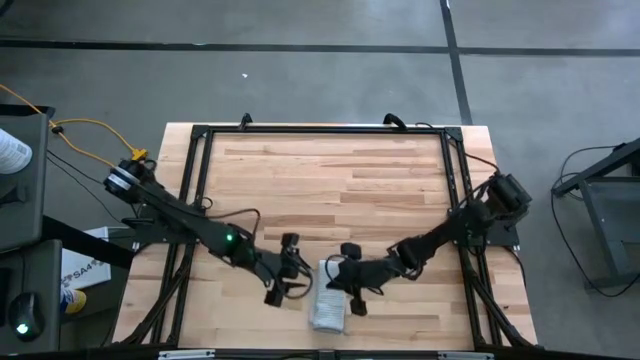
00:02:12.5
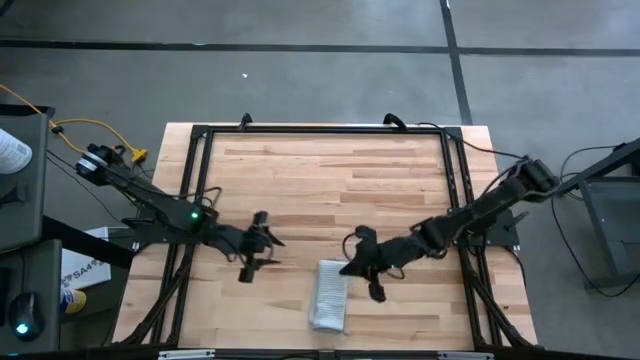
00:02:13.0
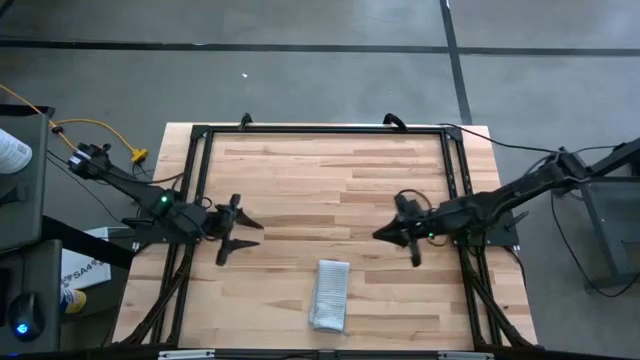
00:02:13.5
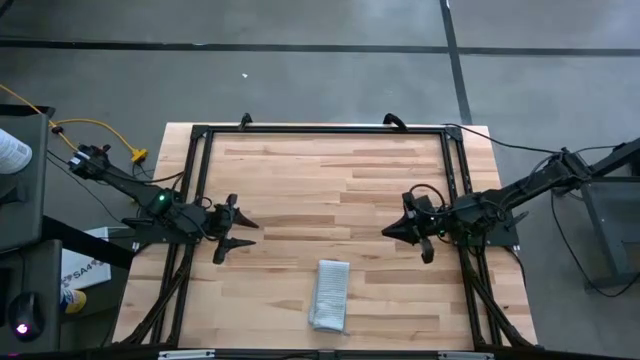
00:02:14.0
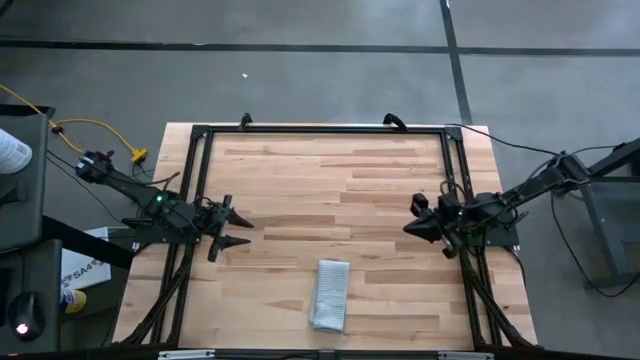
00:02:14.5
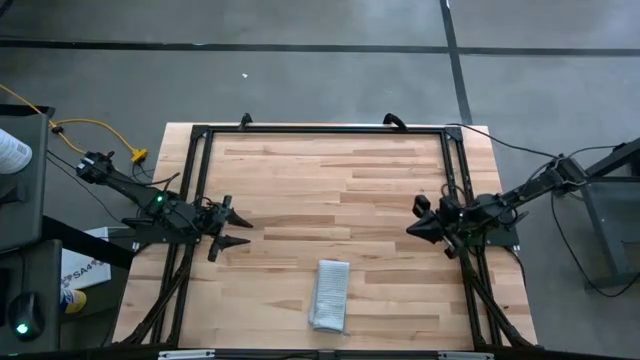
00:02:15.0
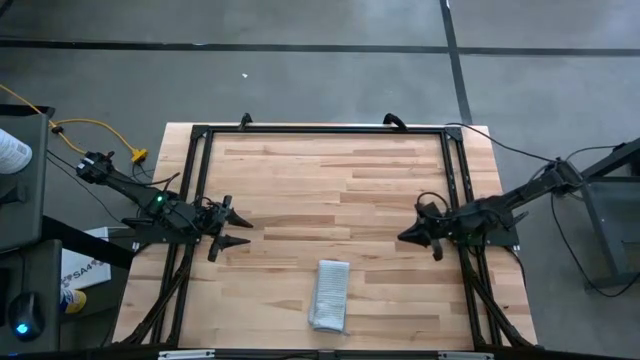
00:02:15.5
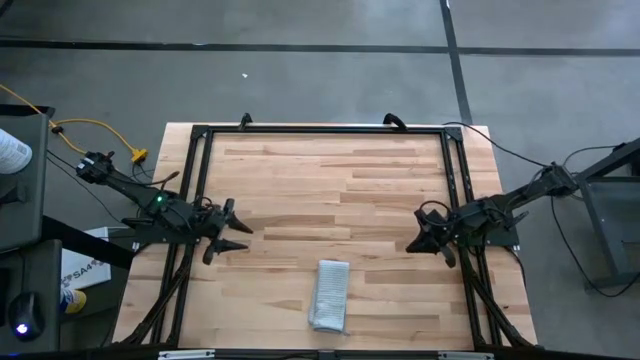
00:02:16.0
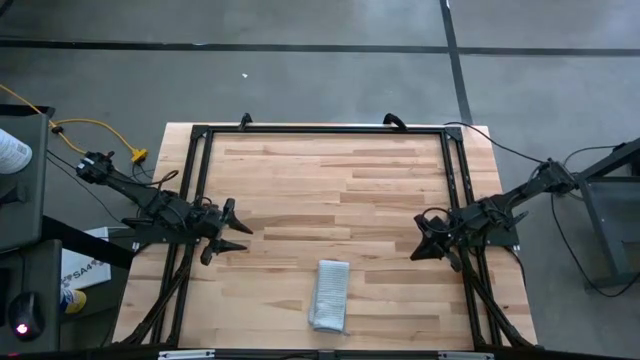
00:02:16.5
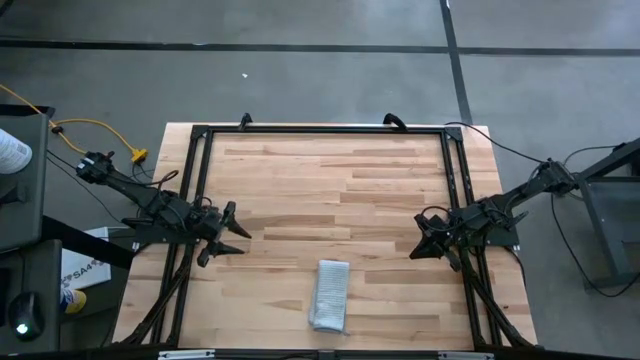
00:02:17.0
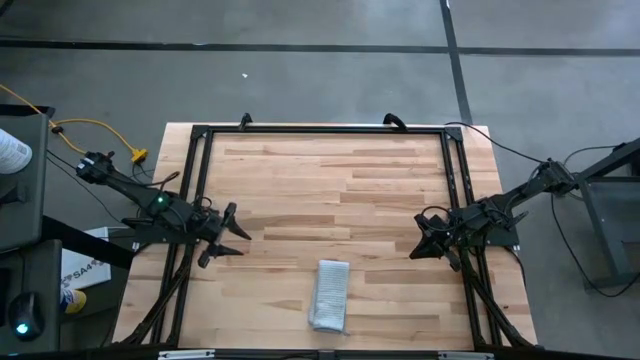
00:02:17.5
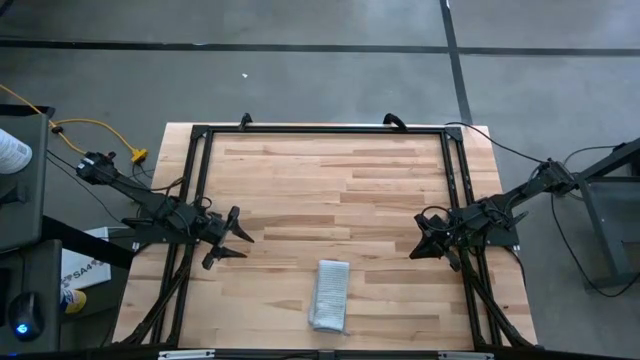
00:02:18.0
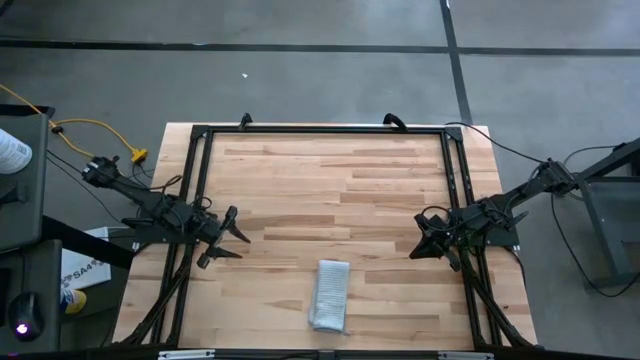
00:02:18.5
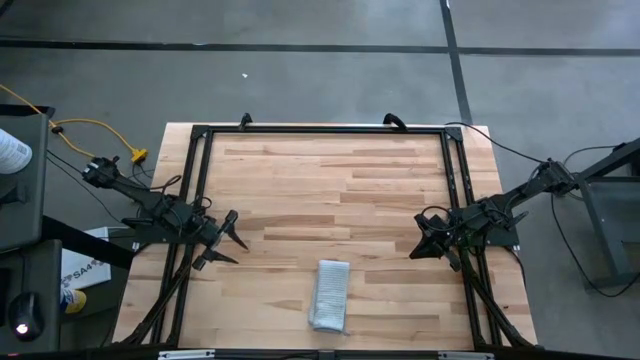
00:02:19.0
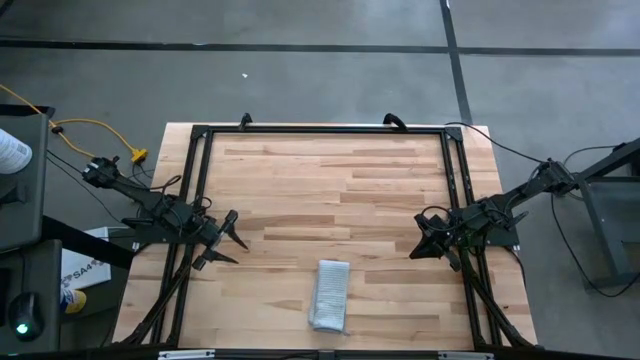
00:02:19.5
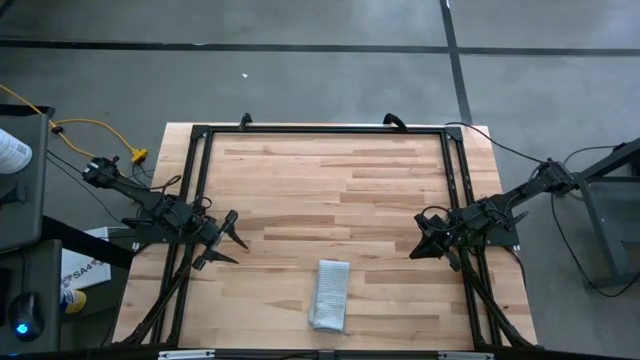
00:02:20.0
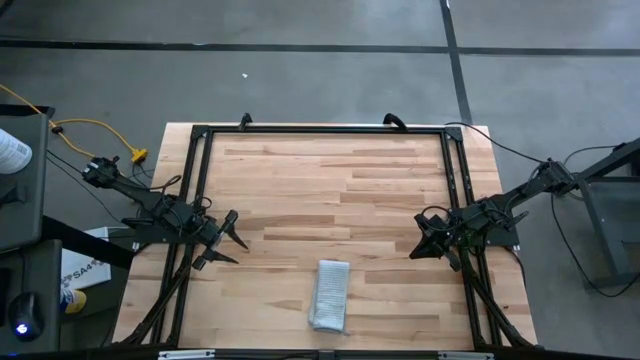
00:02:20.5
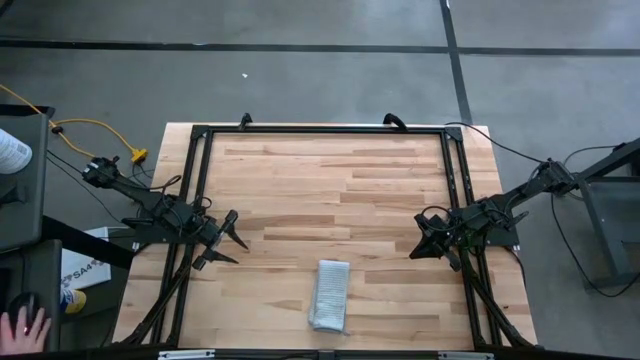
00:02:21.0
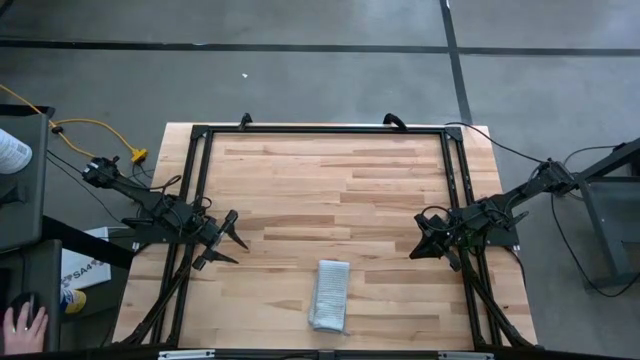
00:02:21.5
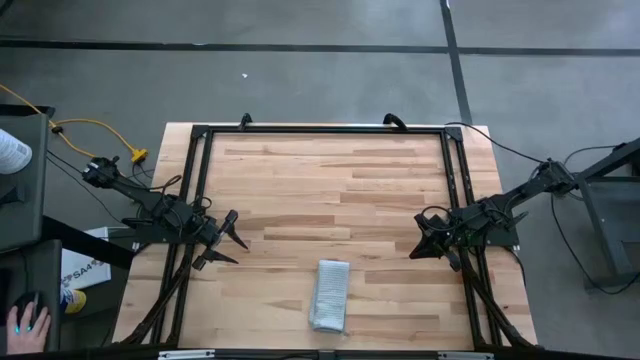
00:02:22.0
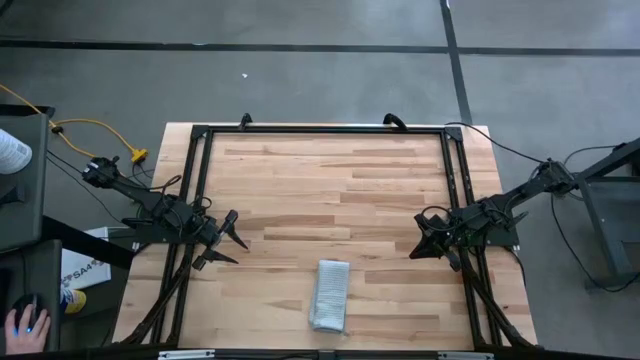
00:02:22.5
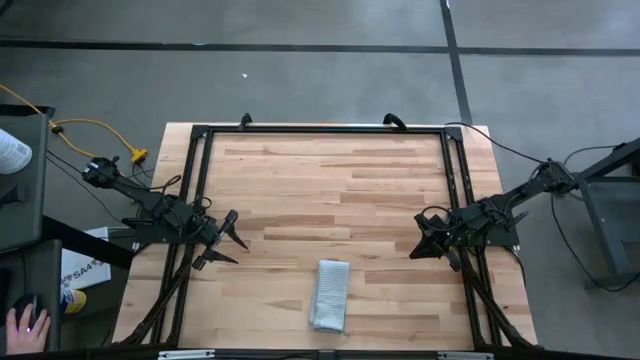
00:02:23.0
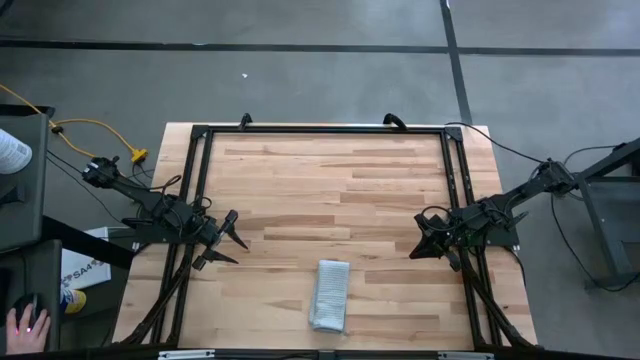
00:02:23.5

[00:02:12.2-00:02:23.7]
Task: Fold microfiber towels
Return to Home Position

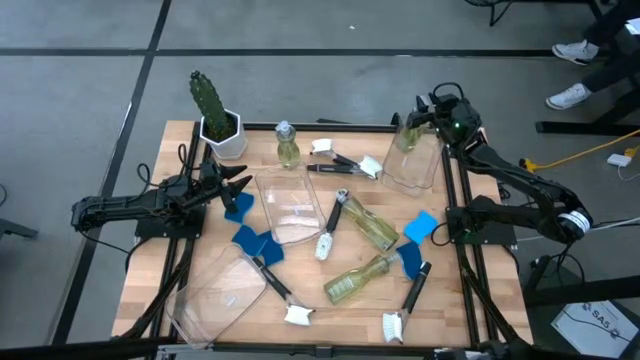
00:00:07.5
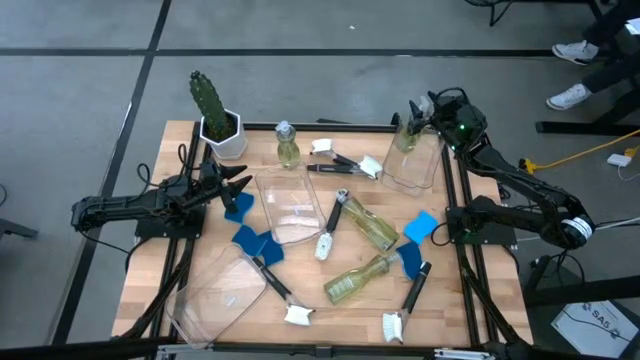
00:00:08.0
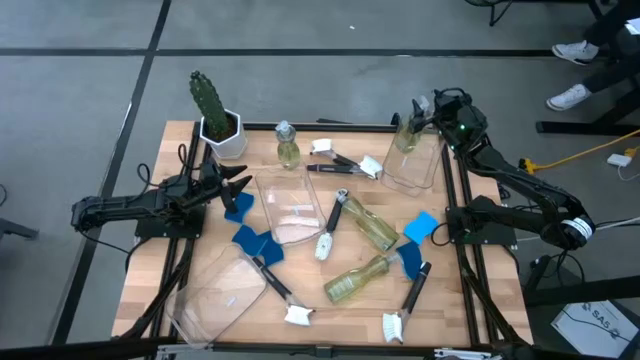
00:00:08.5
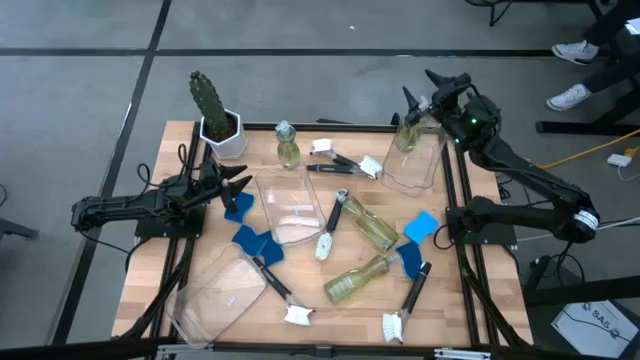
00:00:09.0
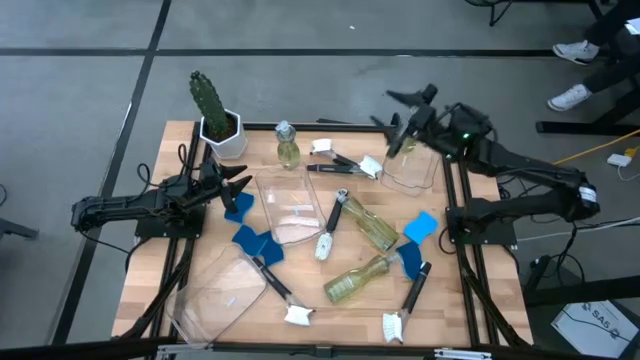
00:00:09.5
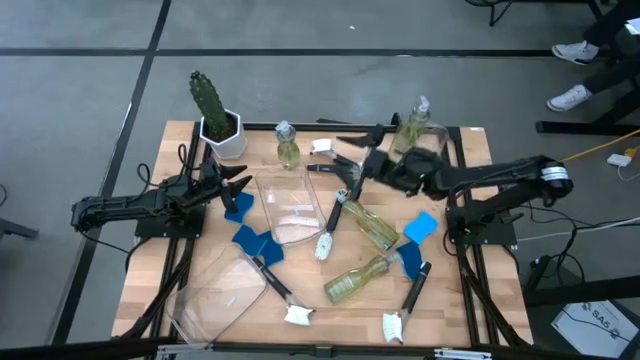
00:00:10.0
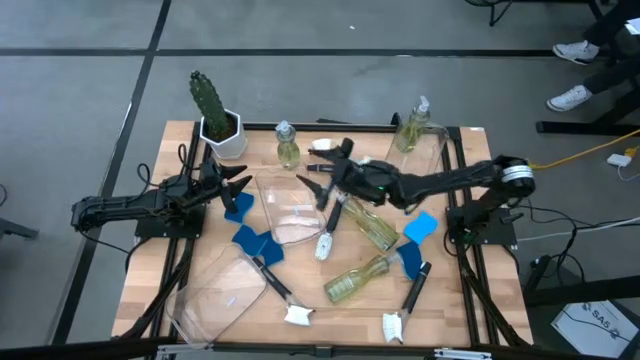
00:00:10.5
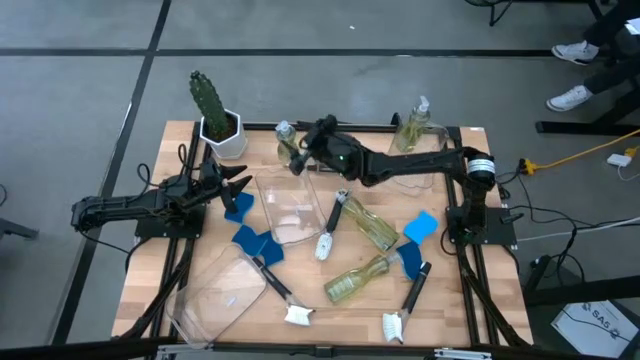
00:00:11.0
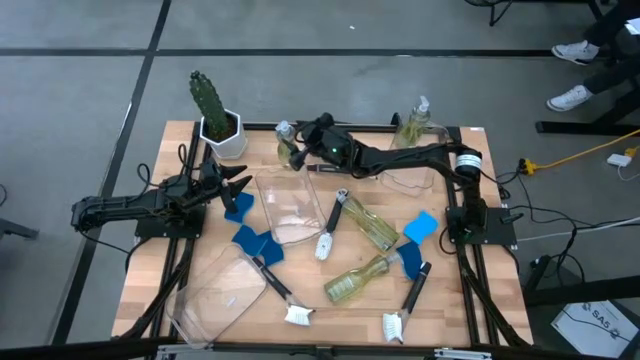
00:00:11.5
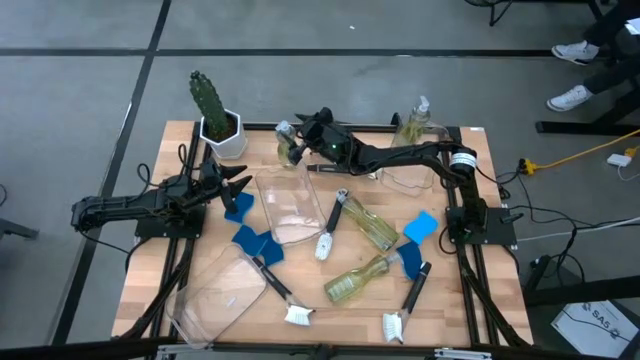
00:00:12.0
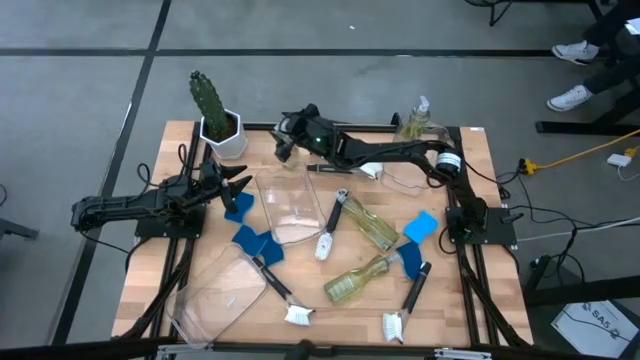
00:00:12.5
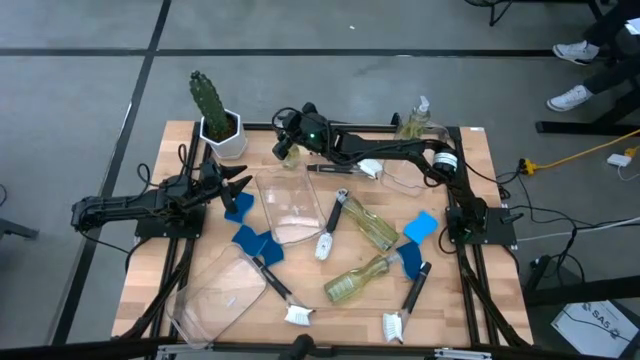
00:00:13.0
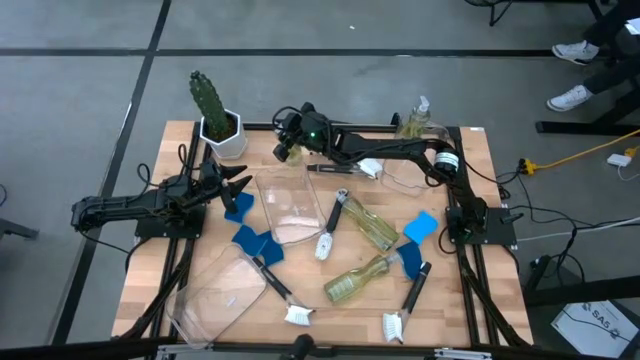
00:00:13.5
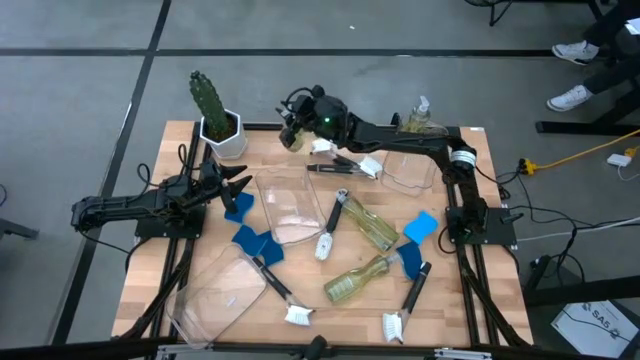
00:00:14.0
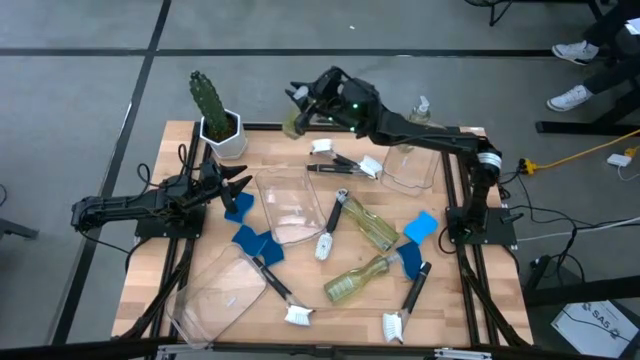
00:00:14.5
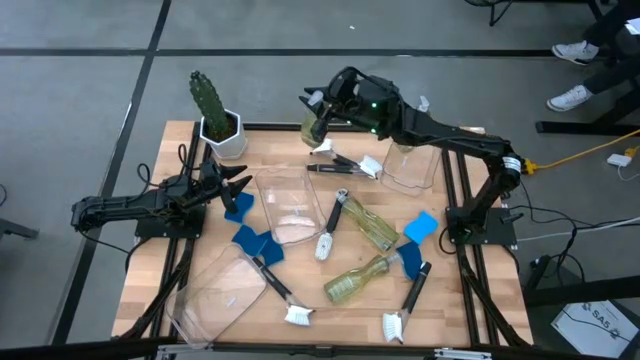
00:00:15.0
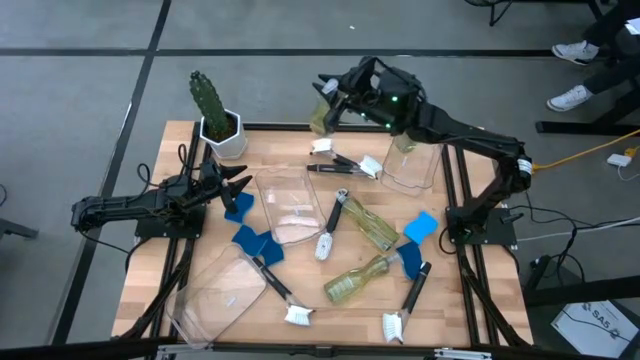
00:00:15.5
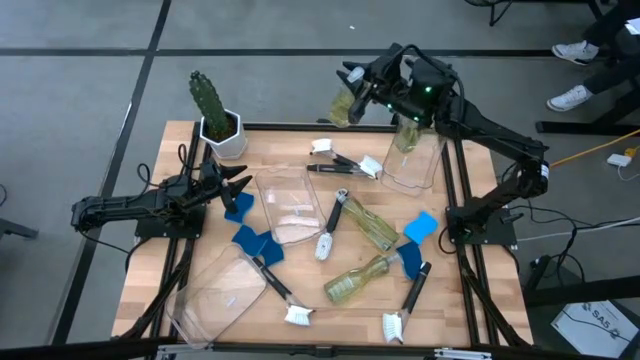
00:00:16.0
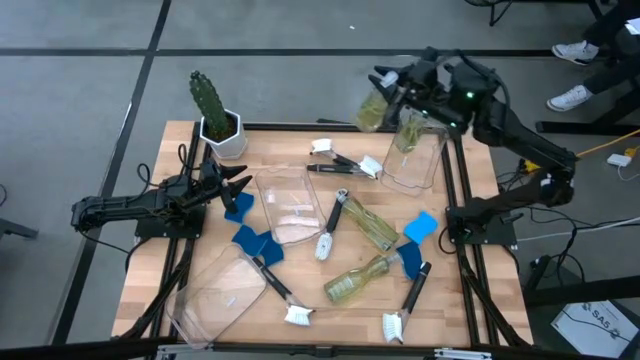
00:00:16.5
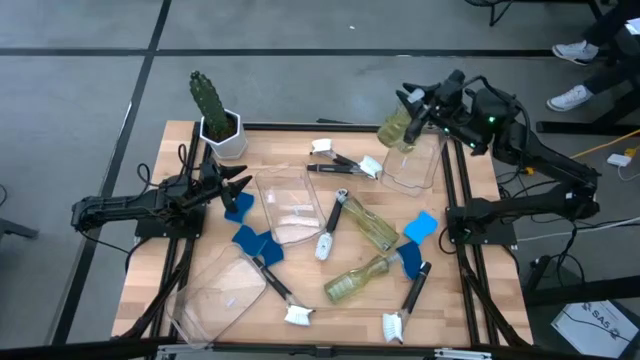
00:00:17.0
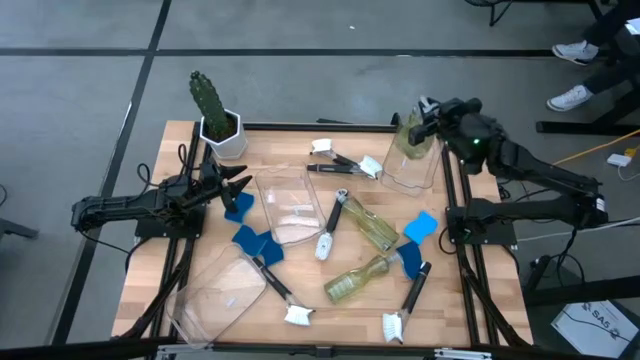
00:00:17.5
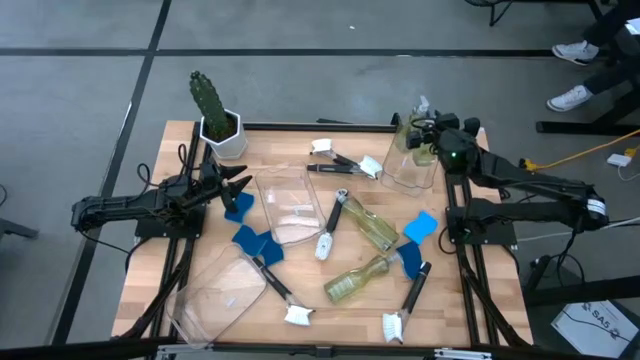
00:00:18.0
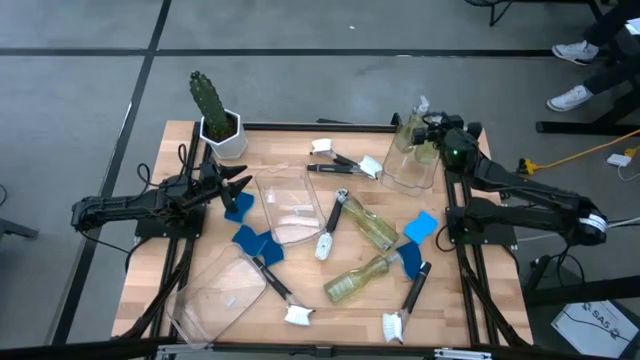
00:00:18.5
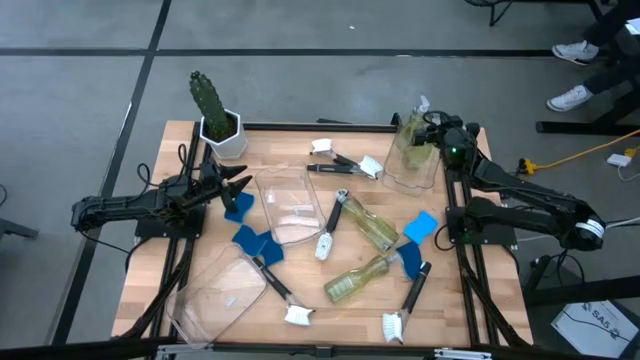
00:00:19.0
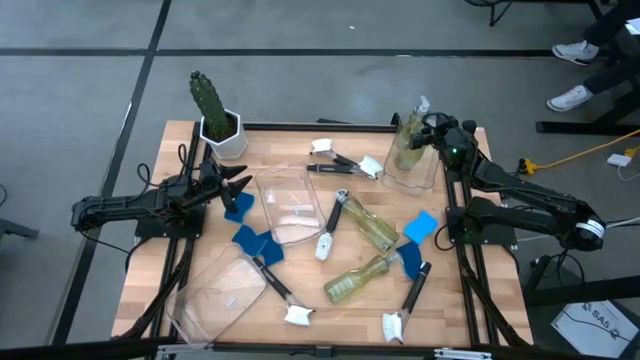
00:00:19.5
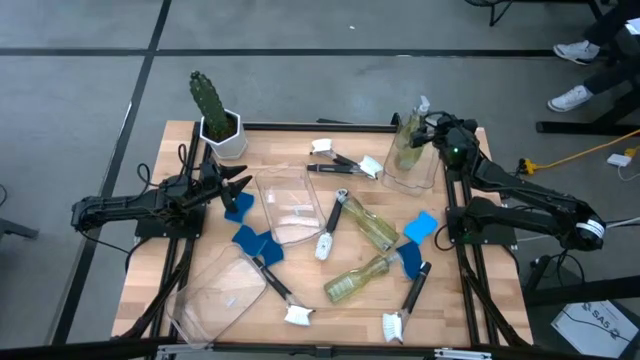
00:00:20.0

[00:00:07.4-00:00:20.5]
Task: Pick & Place Kitchen Sink Supplies
Put the green dish soap into the top right transparent bin
